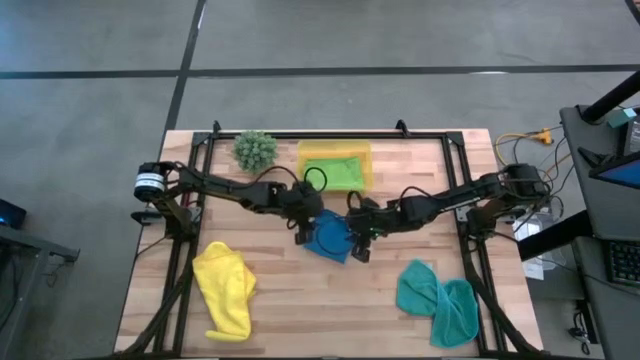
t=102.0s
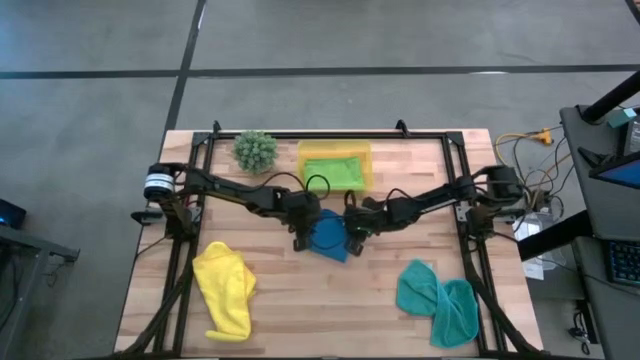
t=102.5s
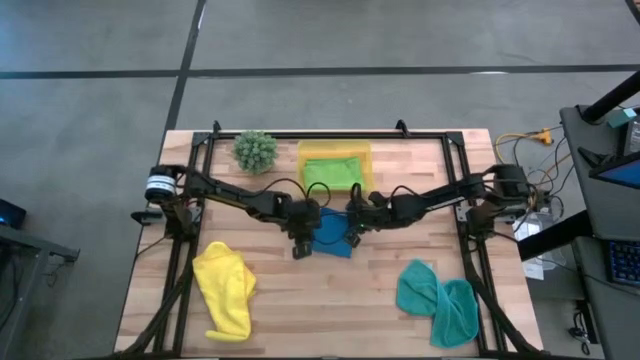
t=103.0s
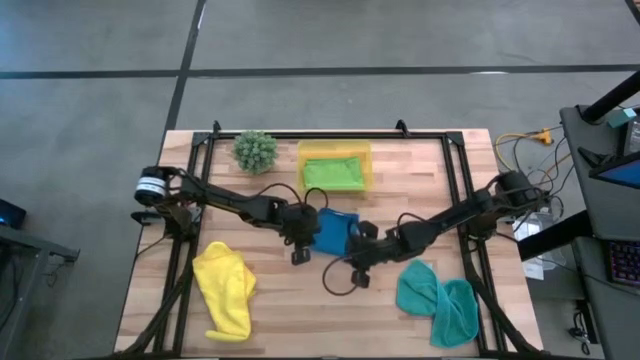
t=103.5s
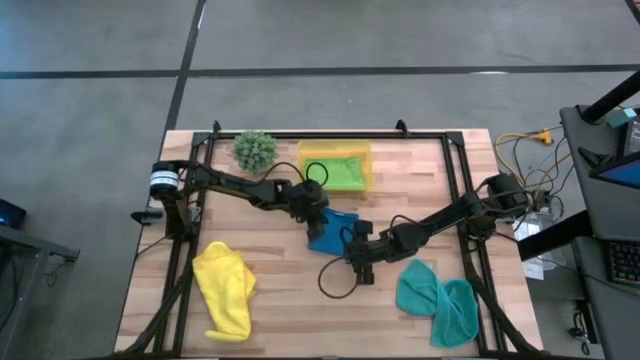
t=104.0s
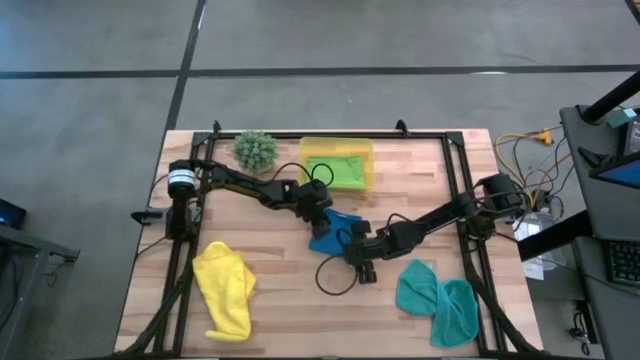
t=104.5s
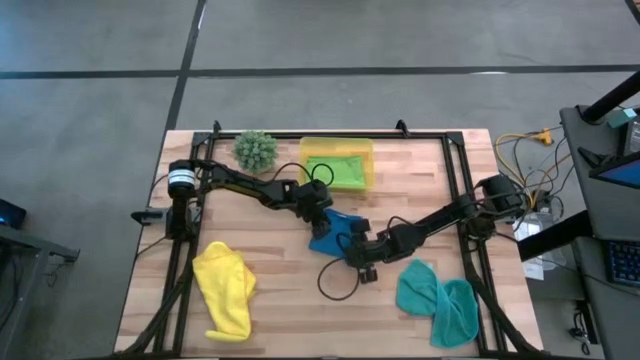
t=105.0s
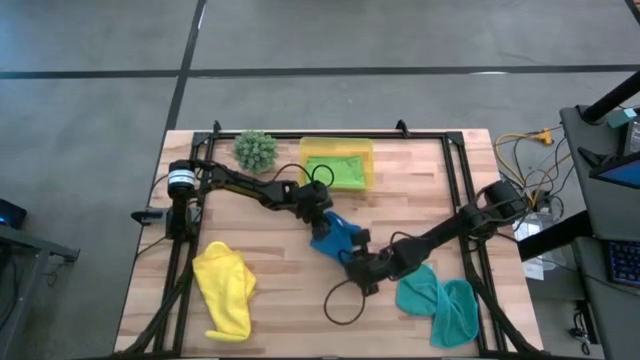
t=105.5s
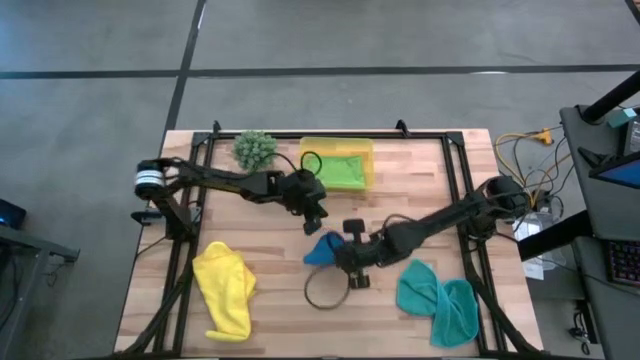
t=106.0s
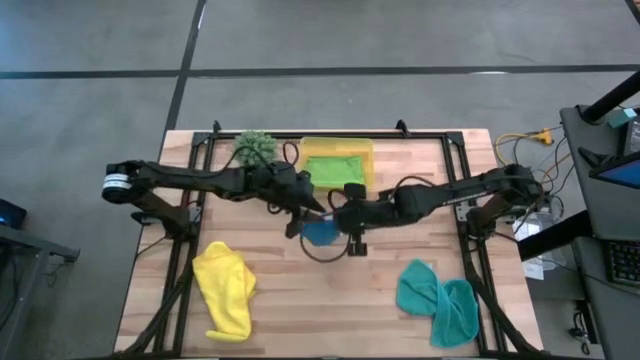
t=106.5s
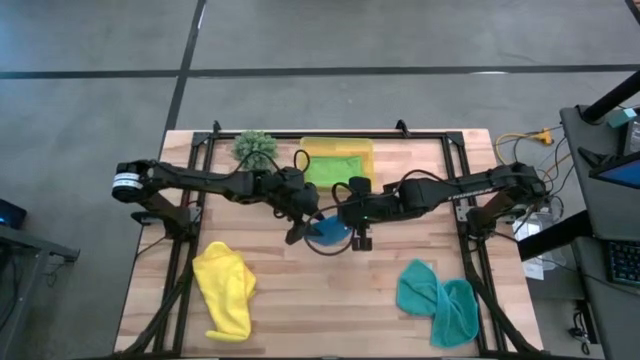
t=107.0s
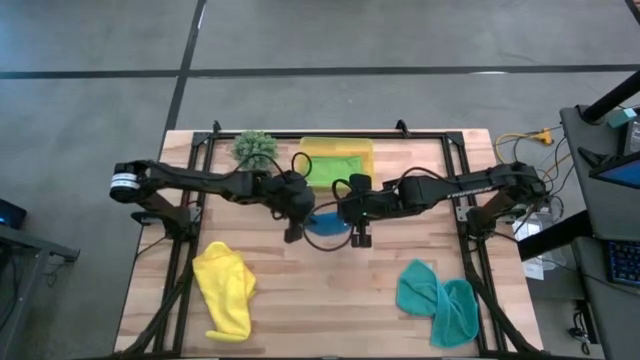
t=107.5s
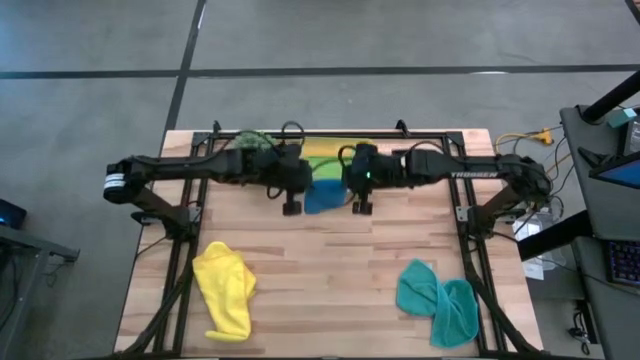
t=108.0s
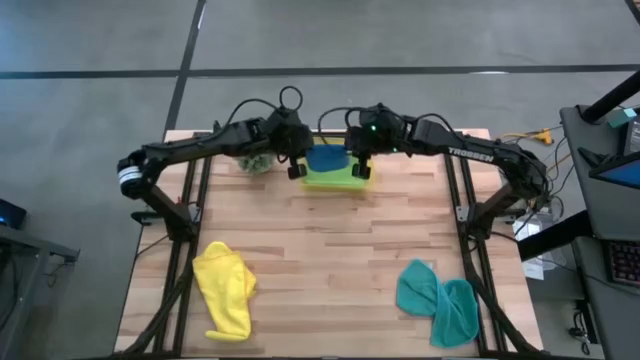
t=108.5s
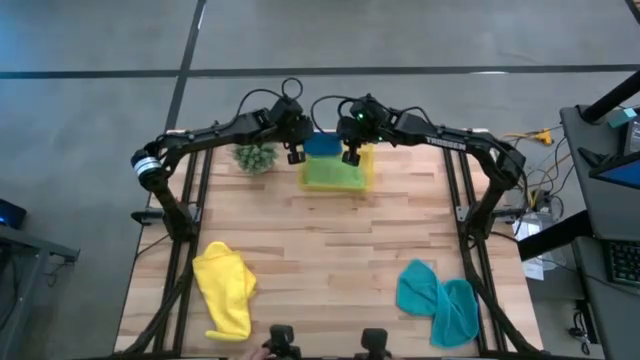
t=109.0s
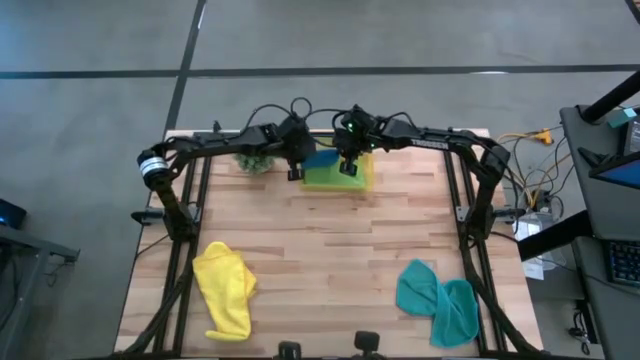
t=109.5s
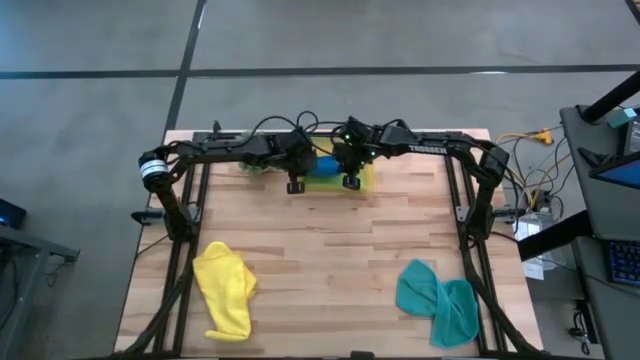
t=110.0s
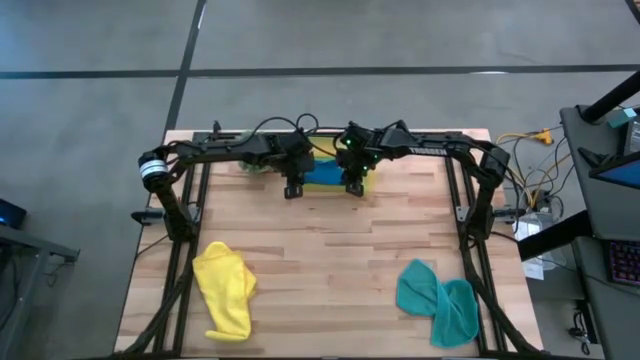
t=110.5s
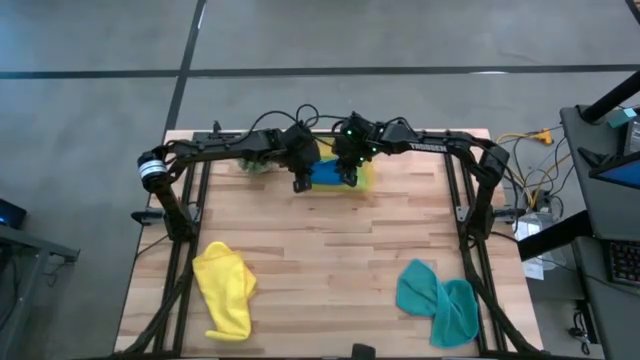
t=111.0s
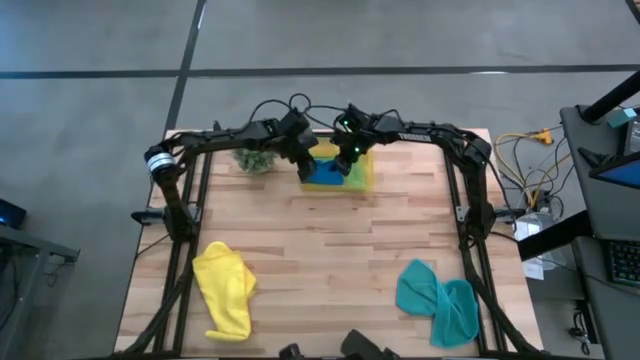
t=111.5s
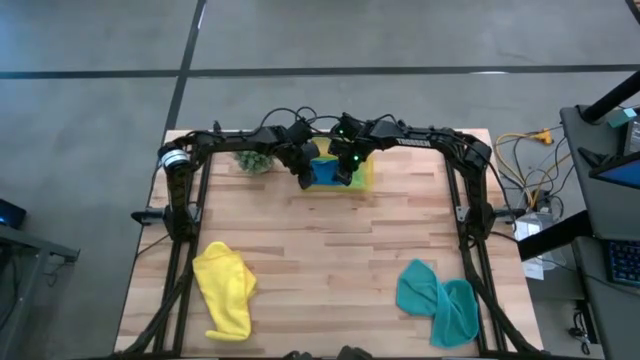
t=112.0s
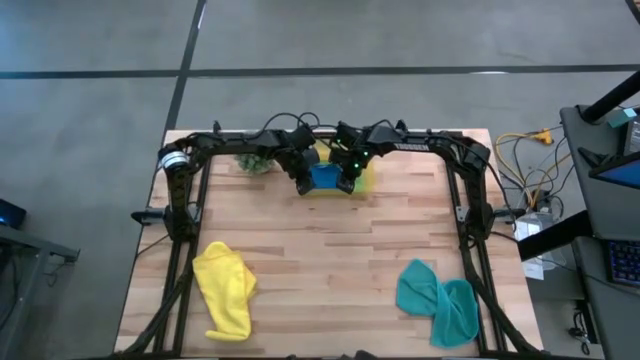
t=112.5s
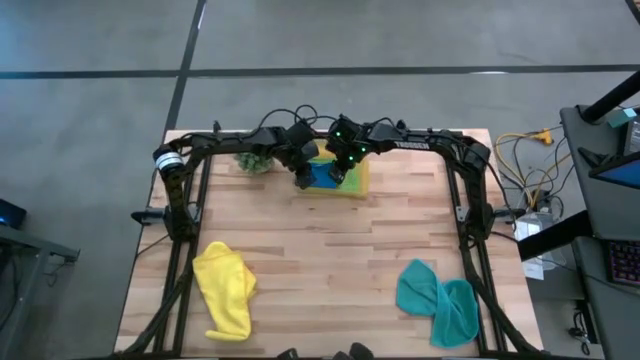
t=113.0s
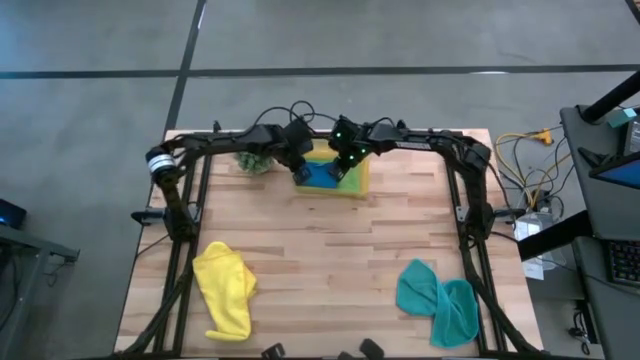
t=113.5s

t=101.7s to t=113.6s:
Task: Fold microfiber towels
Put the blue towel into the yellow bin

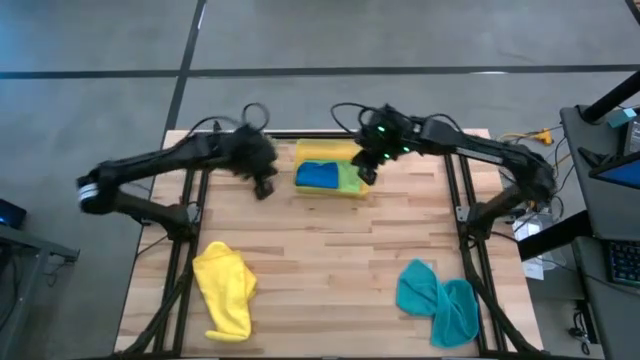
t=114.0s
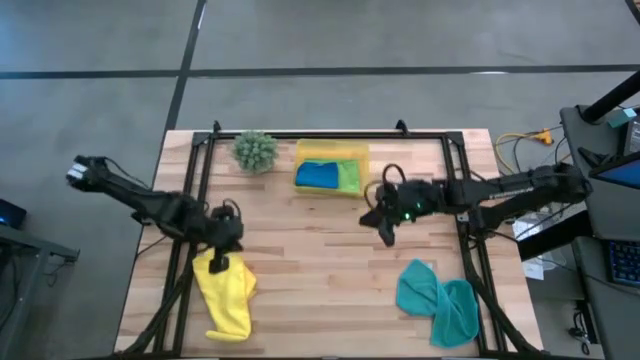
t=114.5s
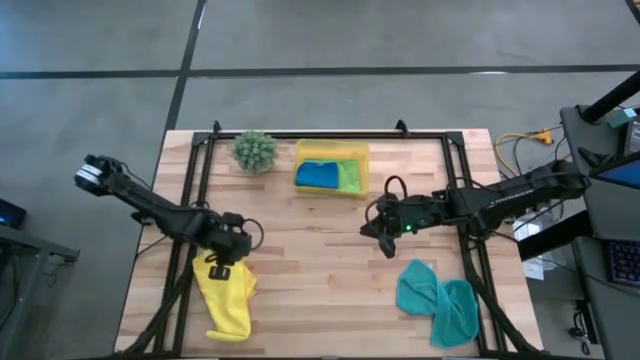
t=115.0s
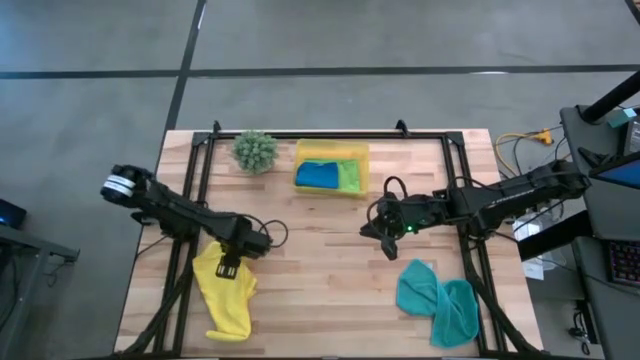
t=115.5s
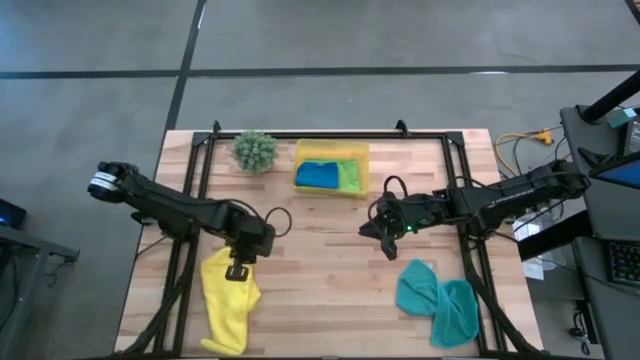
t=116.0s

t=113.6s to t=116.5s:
Fold the yellow towel

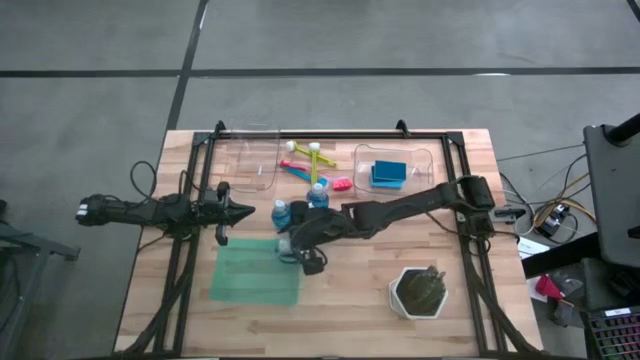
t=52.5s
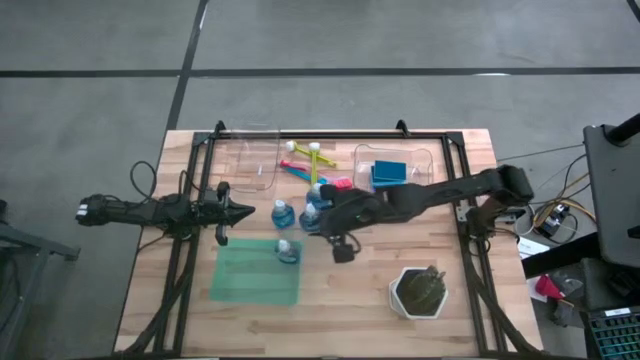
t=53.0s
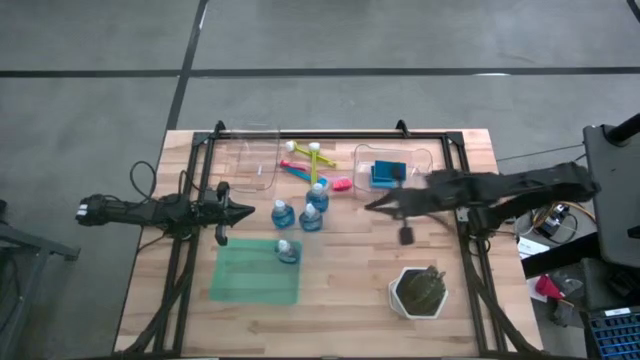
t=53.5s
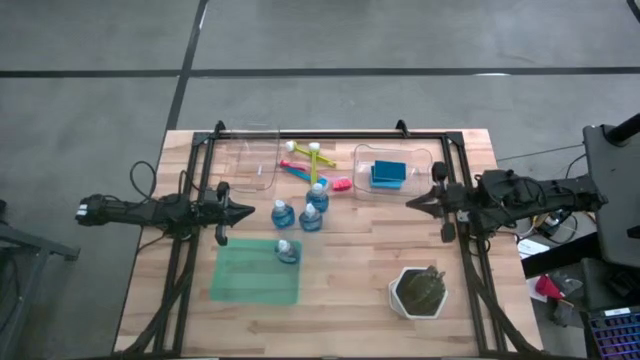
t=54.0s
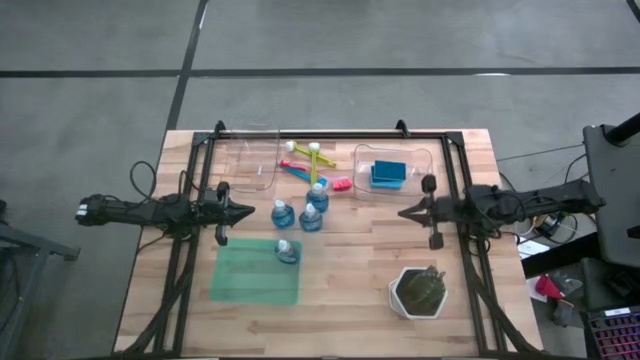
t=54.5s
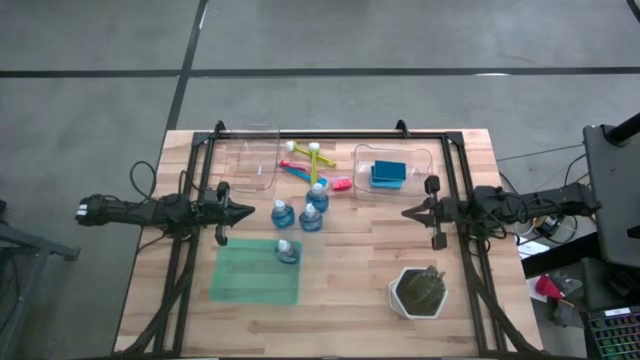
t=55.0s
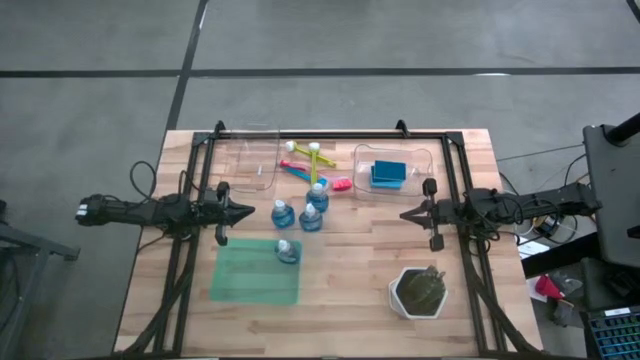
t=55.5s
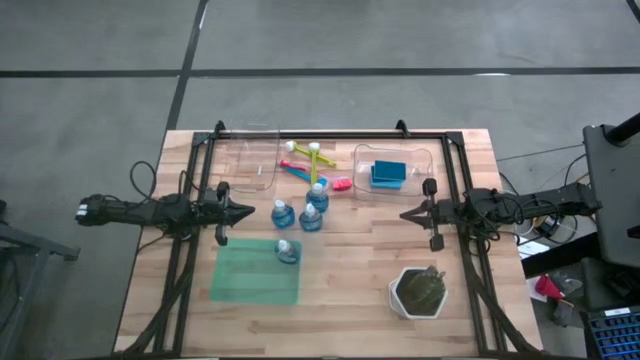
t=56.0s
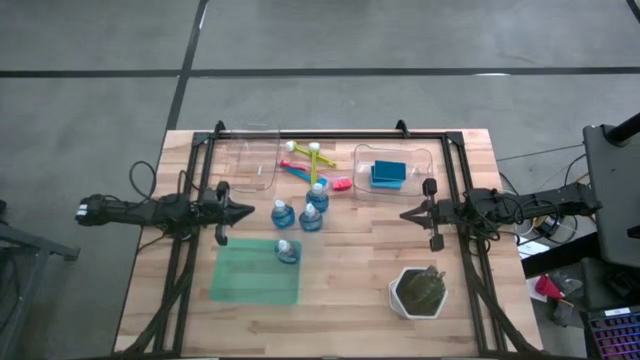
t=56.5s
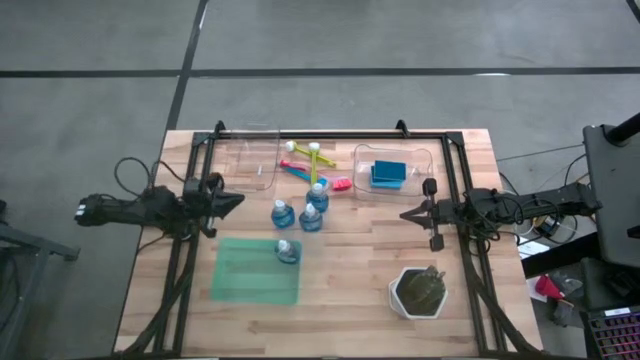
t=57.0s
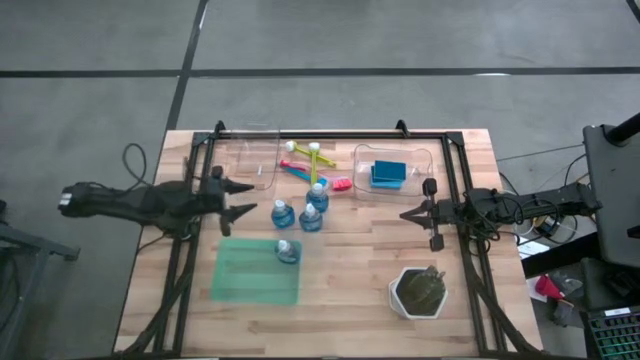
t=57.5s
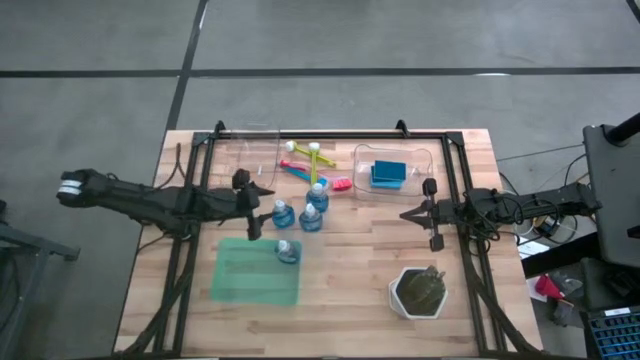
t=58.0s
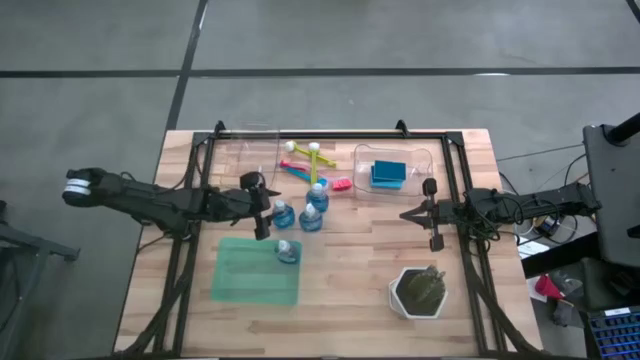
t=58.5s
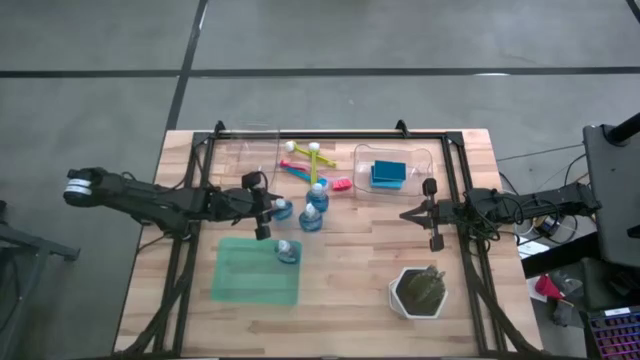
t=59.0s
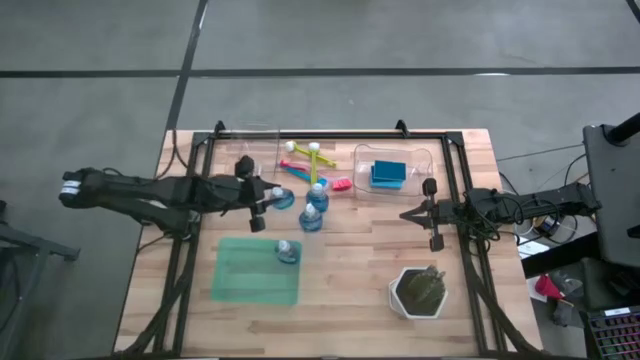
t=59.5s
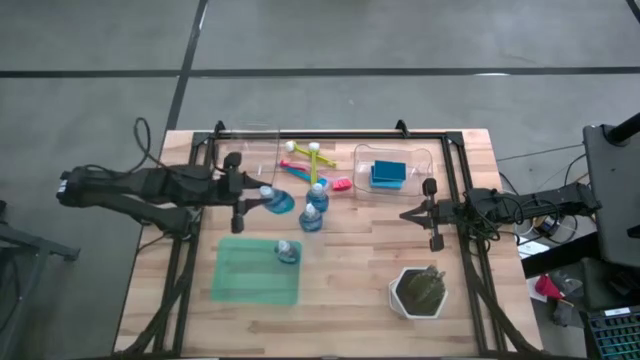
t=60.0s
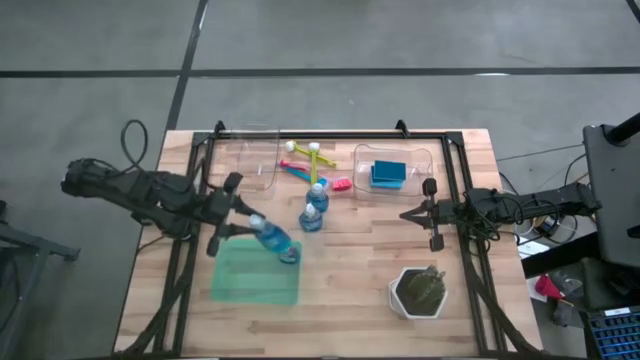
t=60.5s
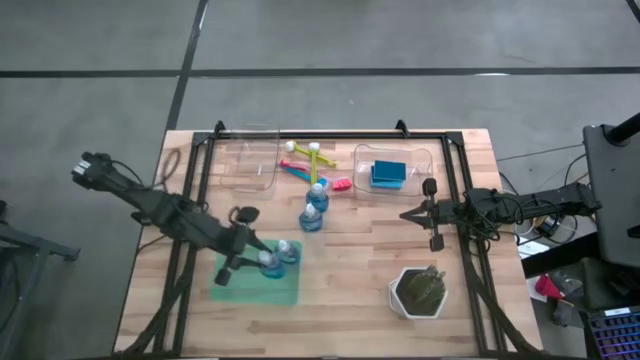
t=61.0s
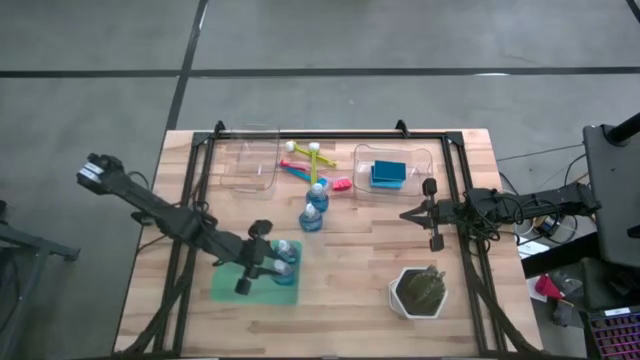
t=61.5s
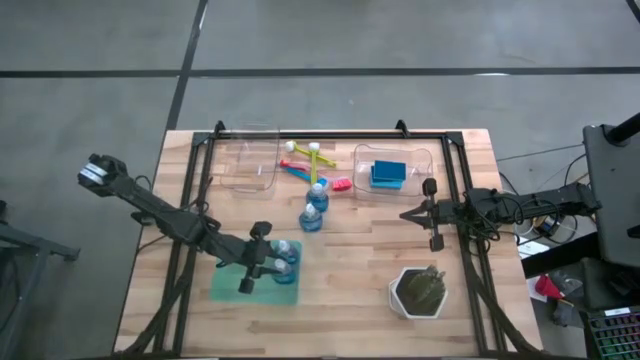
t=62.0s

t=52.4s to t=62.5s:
Task: Pick & Place Kitchen Sink Supplies
Put the blue dishwashing liquid bottle into the green bin
